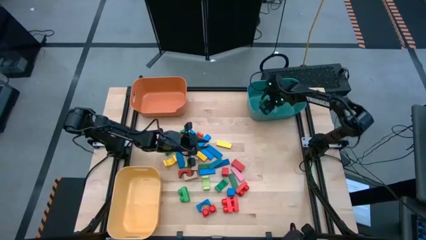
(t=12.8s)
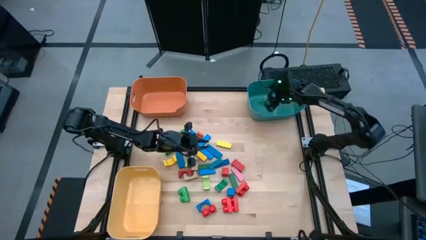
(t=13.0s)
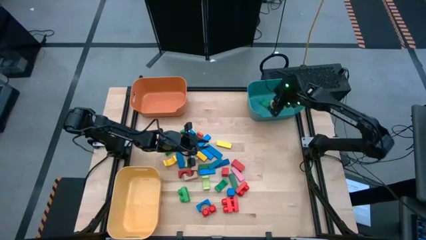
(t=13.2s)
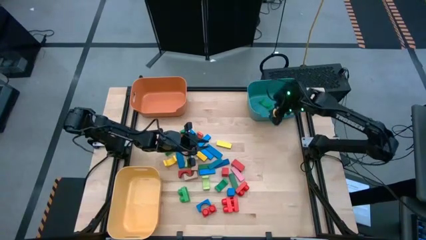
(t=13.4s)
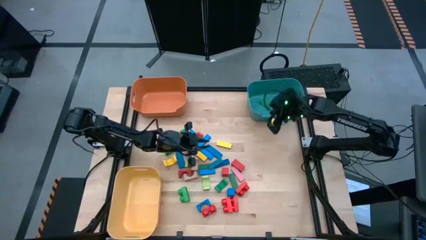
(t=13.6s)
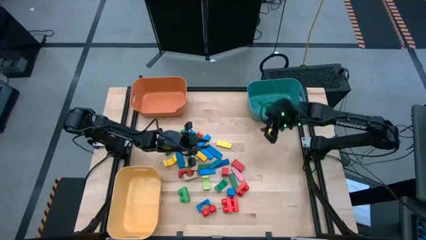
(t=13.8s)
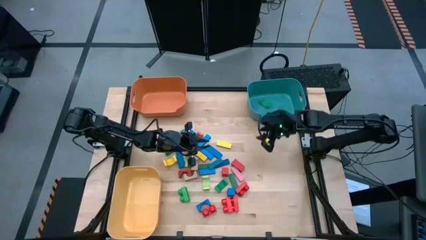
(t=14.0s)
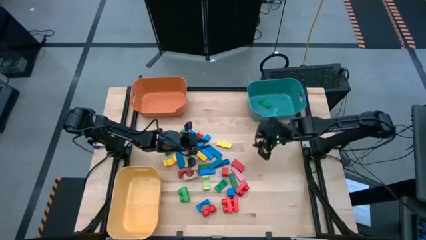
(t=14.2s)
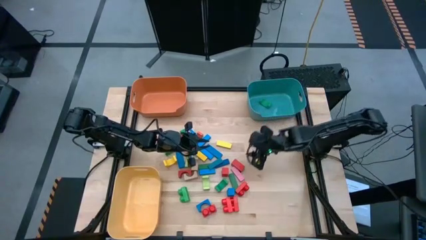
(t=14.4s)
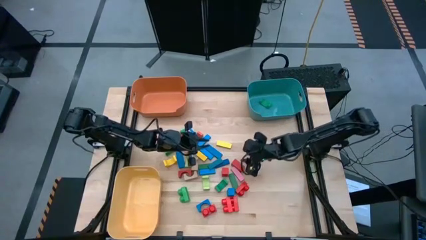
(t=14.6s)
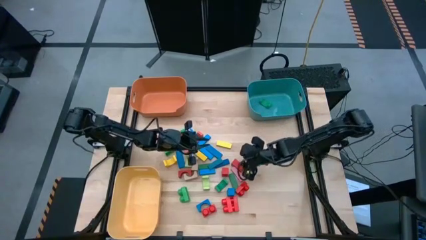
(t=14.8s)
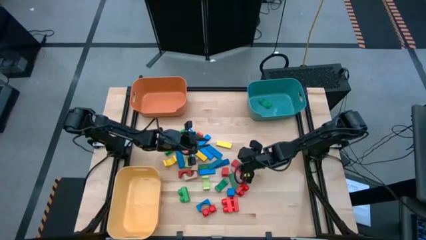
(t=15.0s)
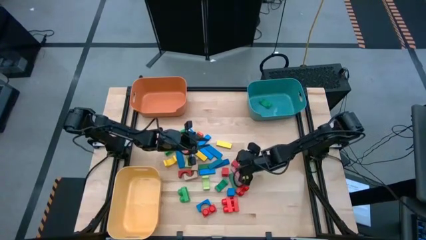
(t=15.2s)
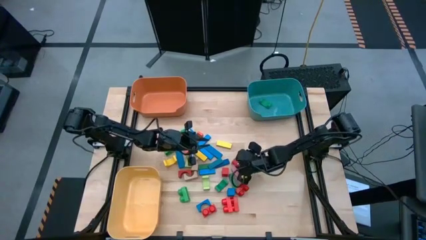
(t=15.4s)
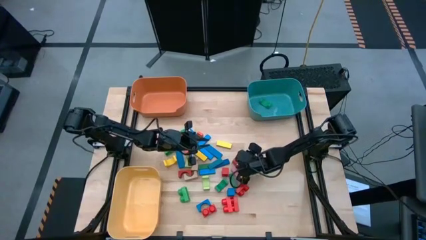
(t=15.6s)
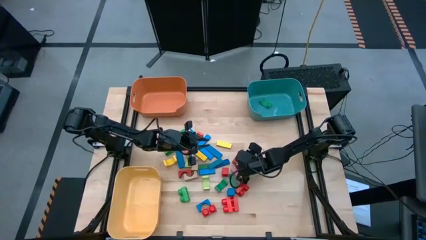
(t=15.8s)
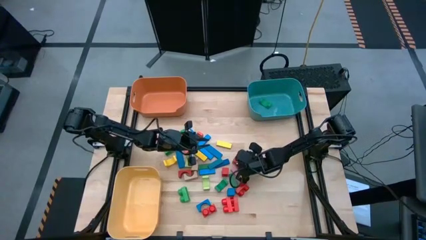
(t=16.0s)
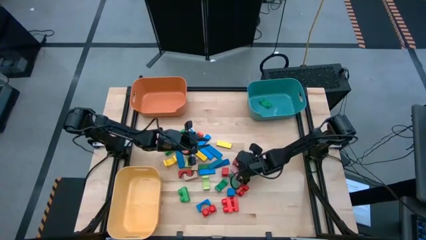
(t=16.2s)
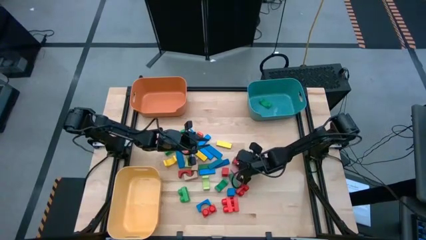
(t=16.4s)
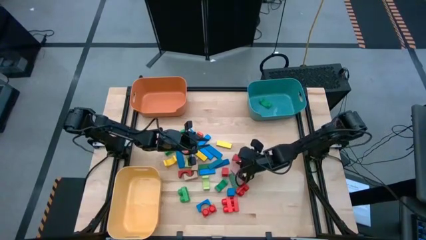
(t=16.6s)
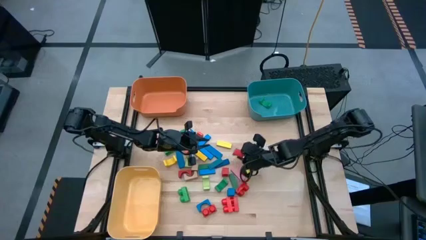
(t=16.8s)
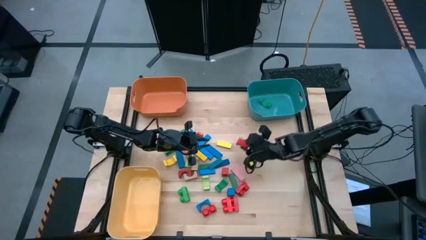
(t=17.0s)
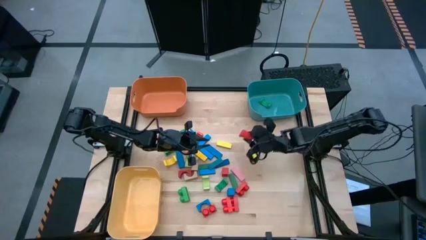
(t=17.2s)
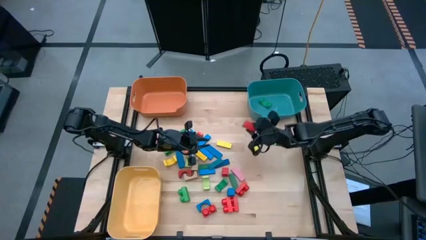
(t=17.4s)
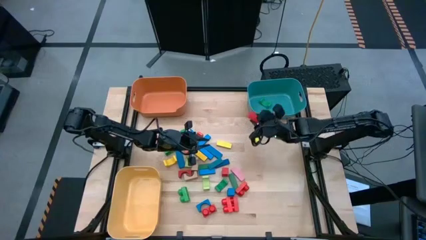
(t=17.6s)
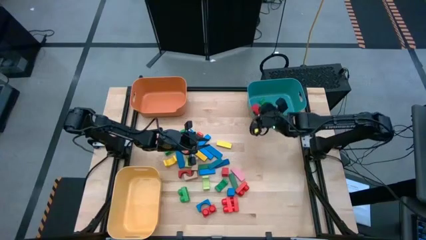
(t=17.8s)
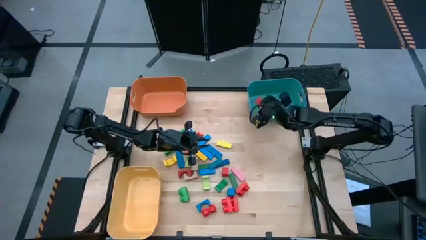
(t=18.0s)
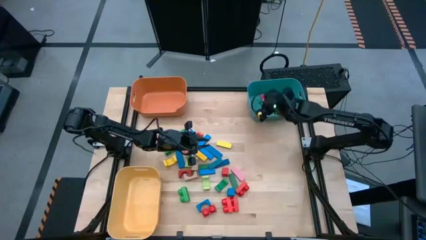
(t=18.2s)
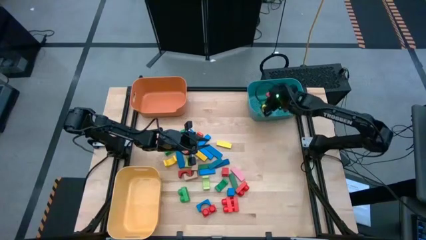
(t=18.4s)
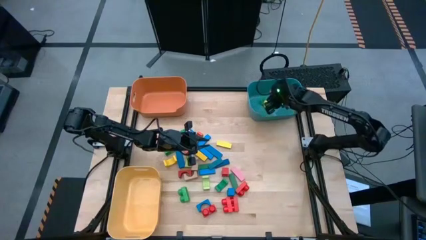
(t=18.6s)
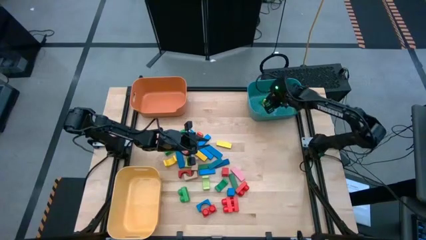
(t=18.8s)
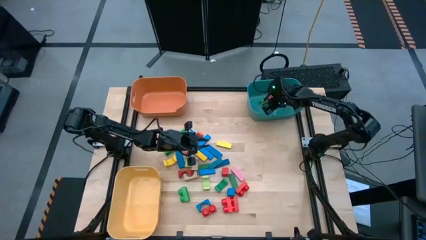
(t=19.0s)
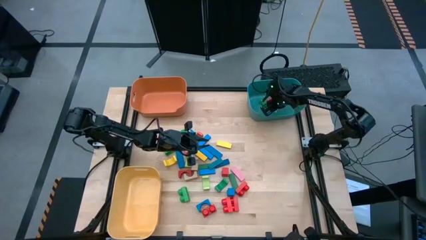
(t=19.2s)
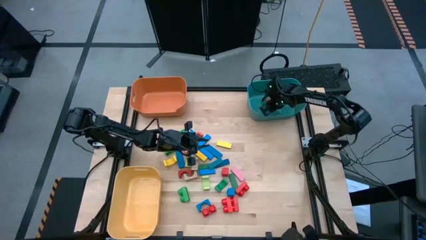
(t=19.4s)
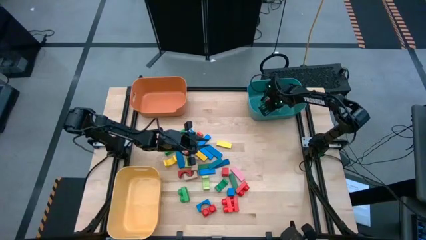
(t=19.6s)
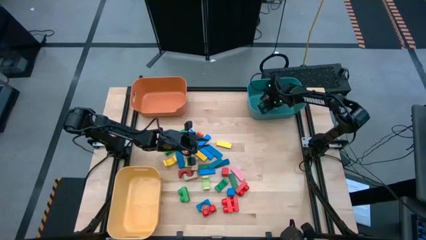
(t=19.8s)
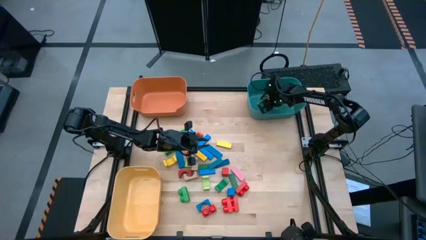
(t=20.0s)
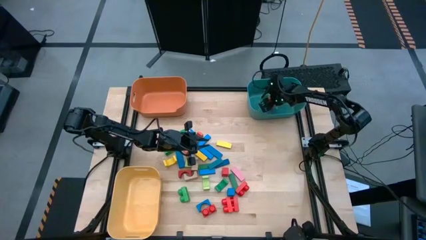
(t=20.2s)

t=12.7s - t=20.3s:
Task: Sort blocks by size
Put the red arch block into the blue bin

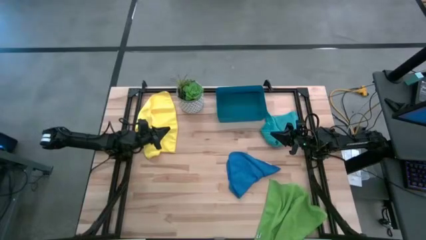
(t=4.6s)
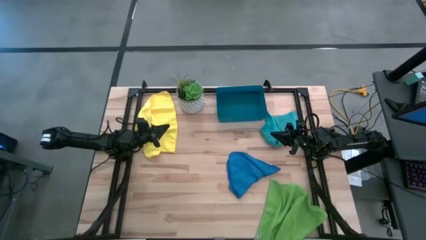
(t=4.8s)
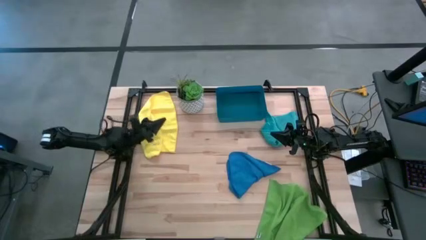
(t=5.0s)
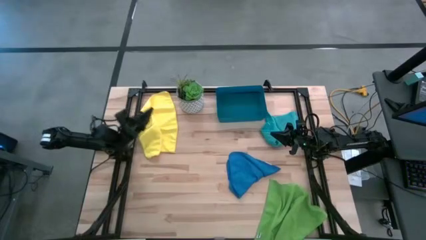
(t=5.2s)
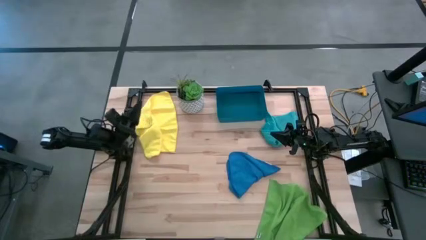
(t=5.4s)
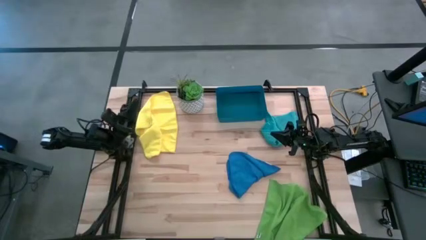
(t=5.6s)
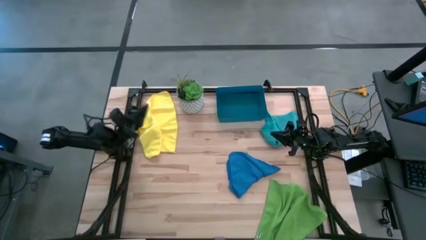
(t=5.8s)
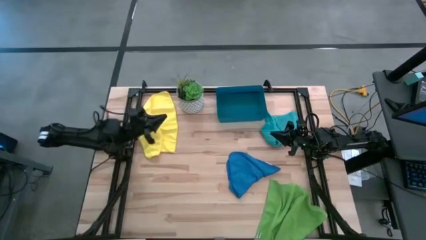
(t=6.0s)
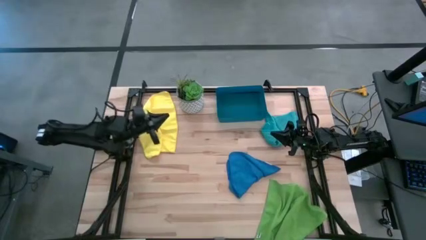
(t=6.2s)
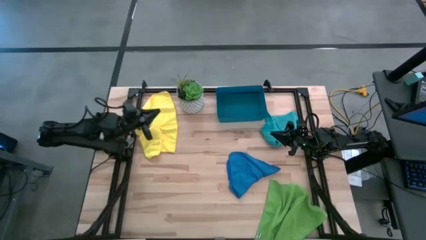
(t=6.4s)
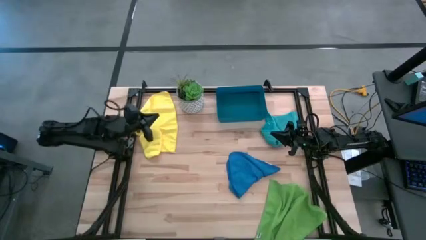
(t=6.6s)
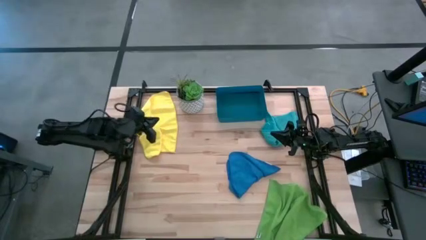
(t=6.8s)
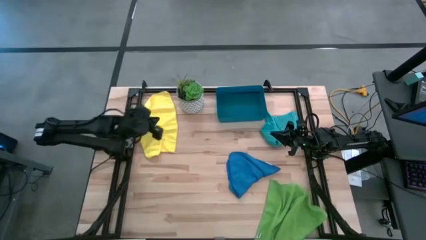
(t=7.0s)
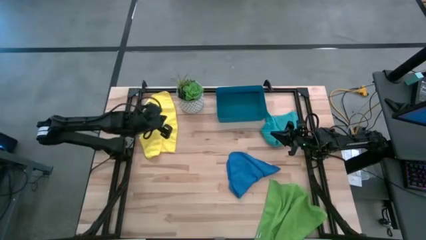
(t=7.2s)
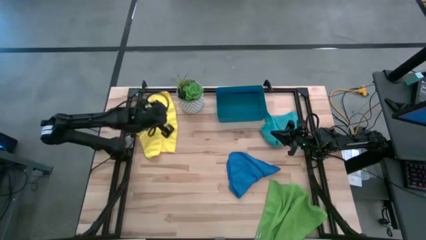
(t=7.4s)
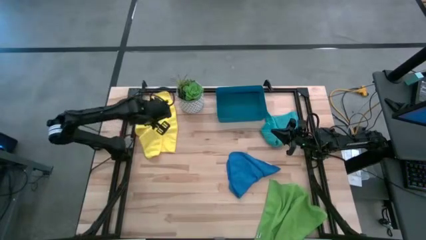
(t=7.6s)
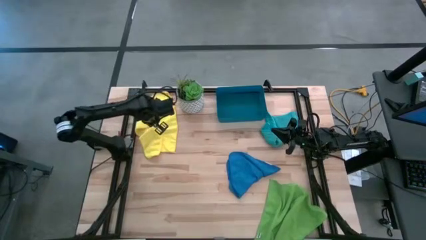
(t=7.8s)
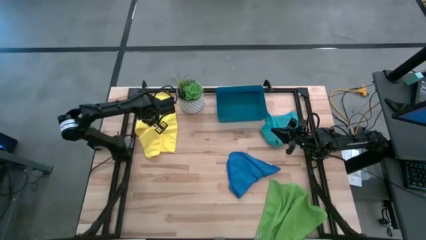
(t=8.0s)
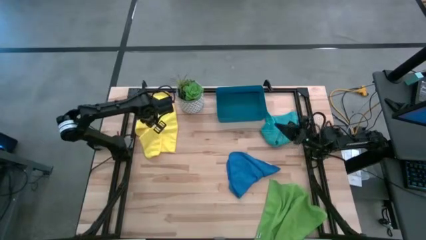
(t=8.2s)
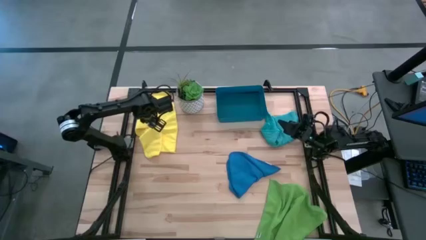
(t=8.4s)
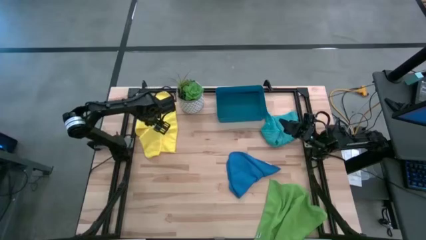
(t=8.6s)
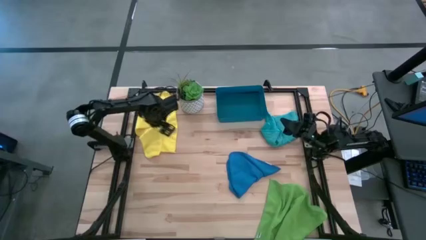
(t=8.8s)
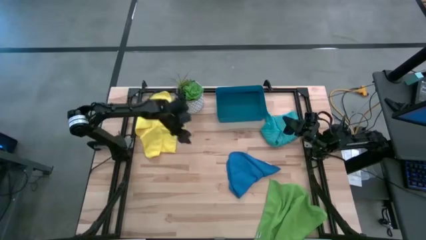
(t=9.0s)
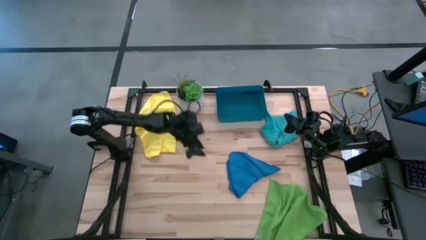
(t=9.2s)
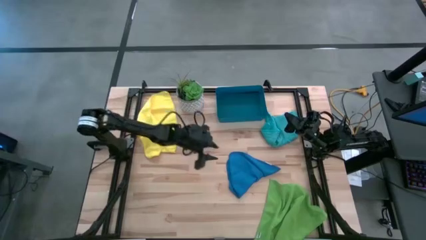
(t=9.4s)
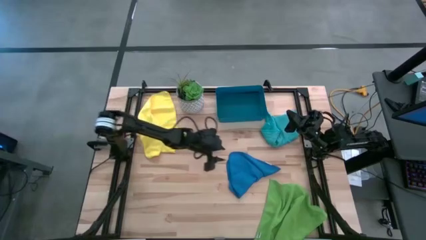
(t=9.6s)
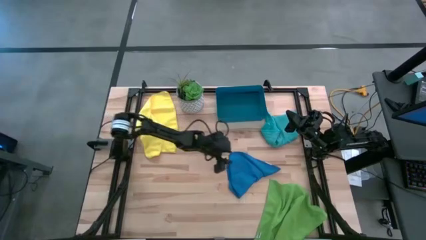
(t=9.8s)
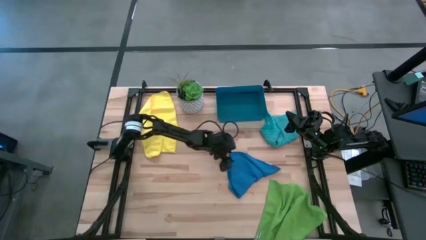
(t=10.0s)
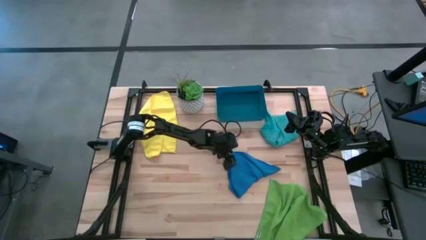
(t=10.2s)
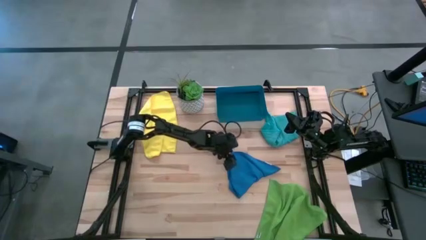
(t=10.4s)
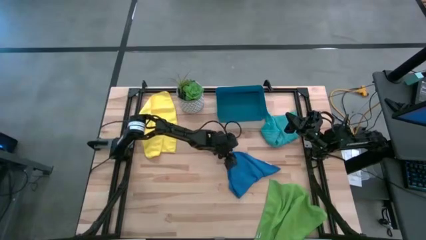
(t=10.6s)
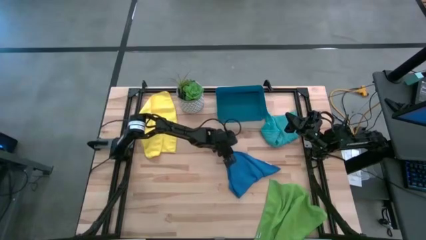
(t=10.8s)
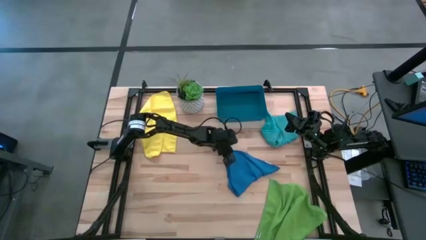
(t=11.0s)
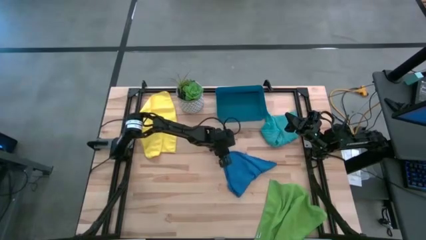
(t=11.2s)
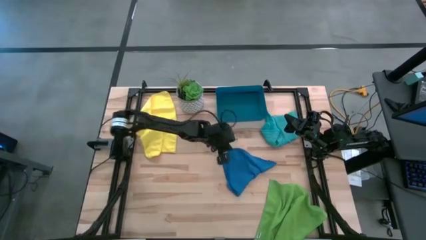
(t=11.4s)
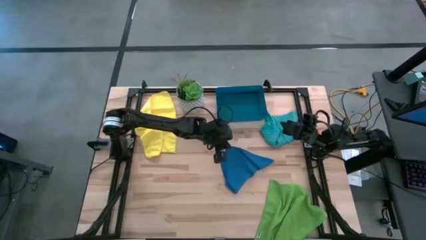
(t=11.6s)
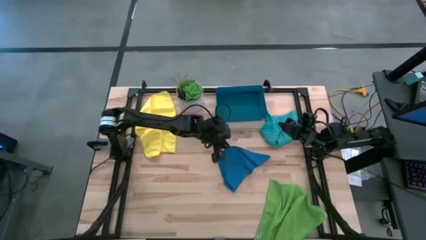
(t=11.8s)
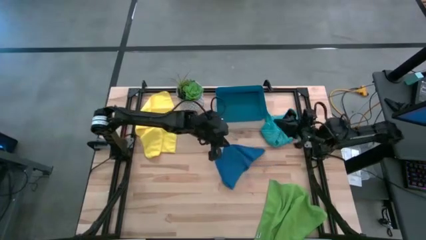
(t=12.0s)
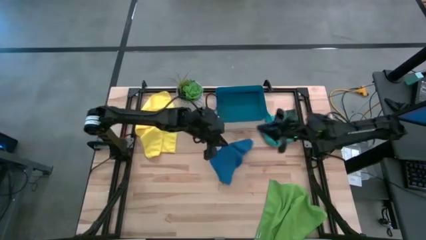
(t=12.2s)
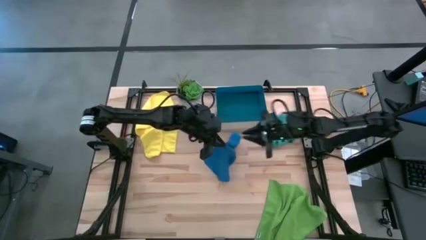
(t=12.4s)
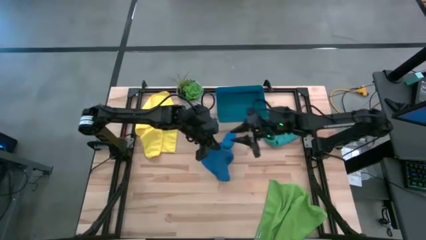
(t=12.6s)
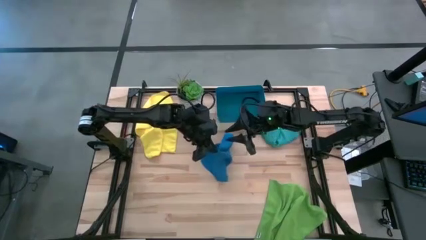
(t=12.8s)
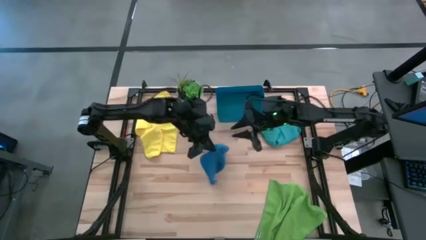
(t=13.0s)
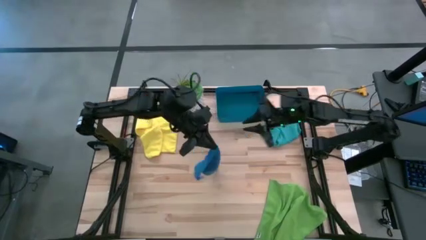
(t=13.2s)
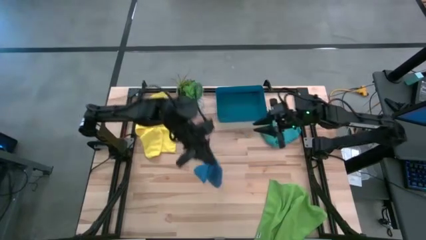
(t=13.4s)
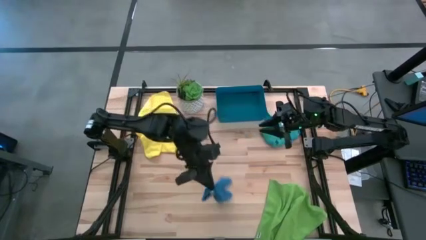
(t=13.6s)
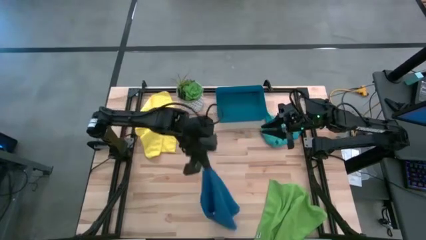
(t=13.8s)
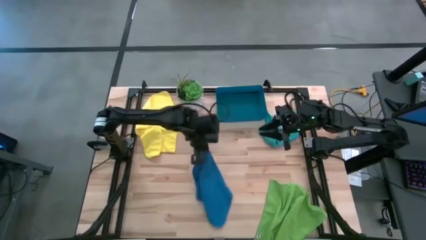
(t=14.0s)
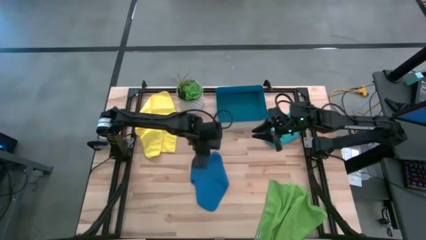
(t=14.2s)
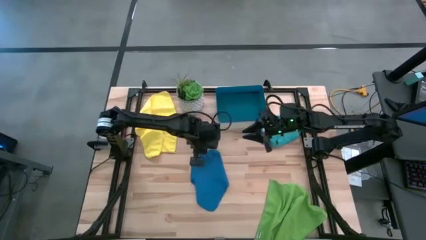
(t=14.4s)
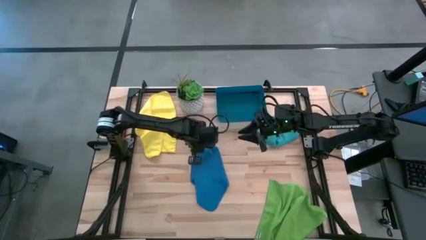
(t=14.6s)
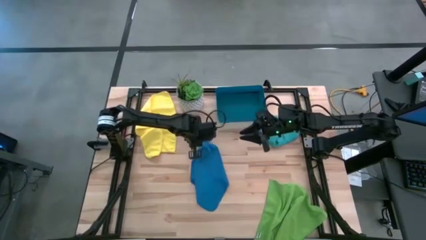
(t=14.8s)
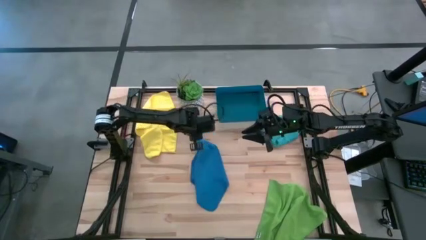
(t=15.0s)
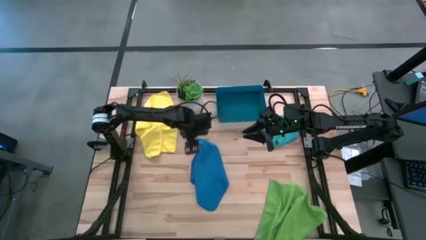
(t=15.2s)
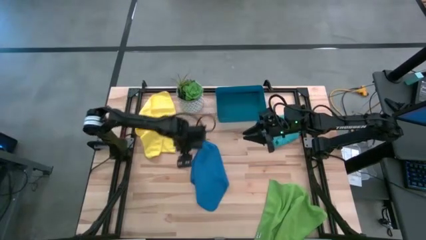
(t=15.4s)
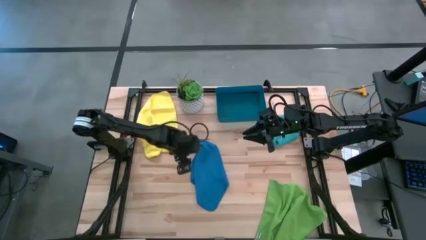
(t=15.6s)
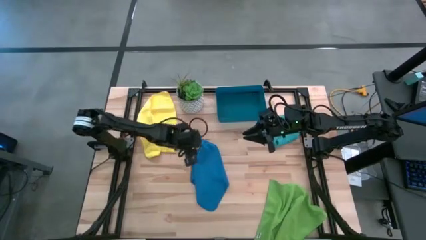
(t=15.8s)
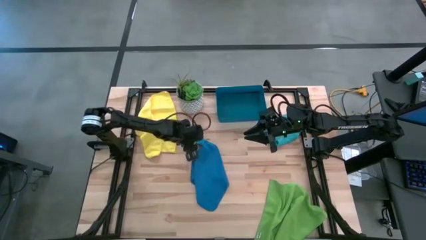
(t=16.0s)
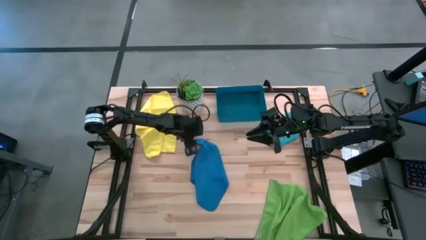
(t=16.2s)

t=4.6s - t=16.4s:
Task: Fold microfiber towels
Fold the dark blue microfiber towel into the dark blue bin
